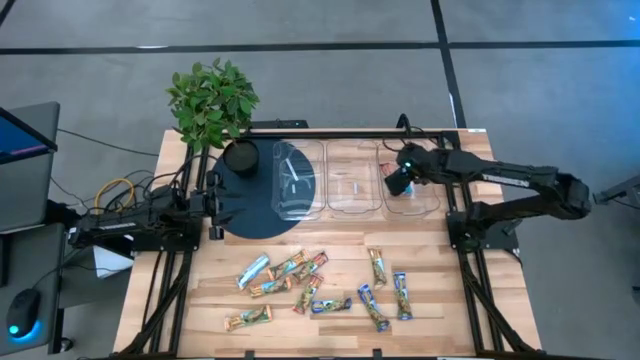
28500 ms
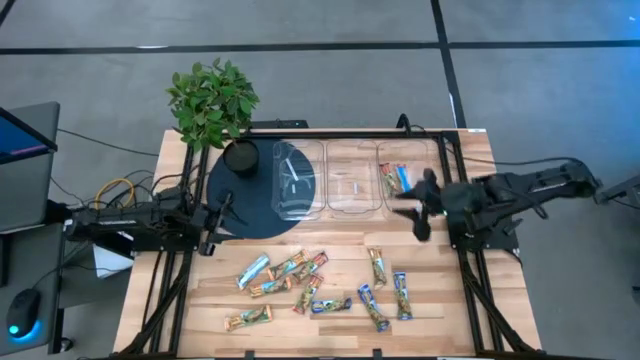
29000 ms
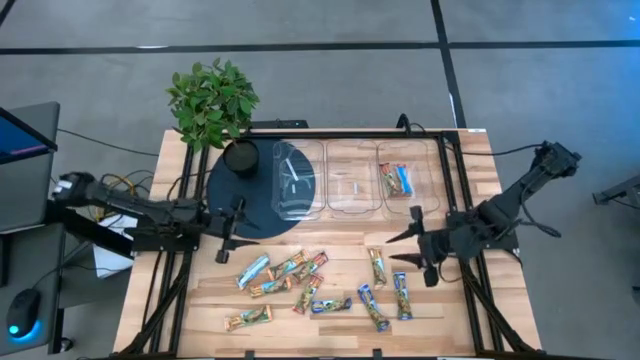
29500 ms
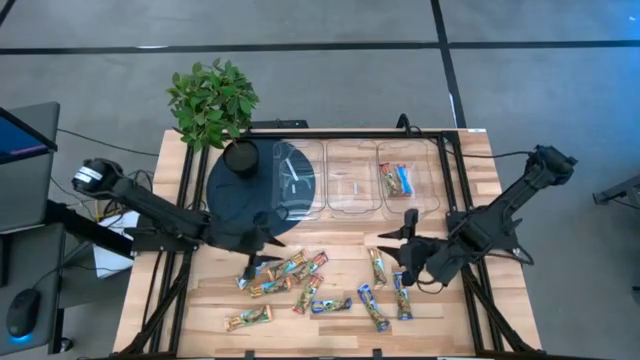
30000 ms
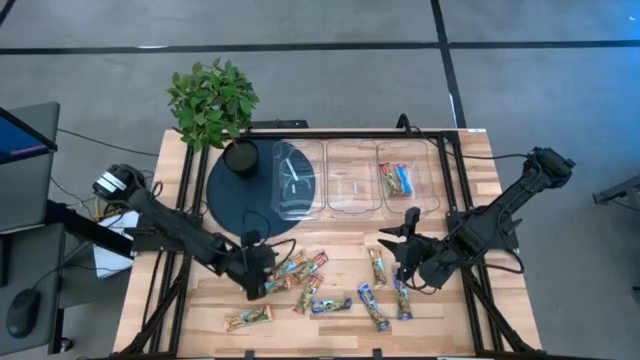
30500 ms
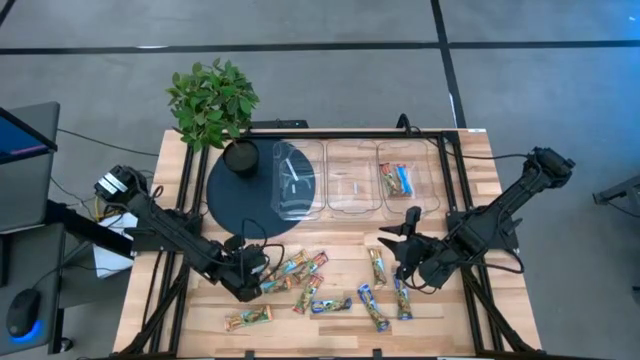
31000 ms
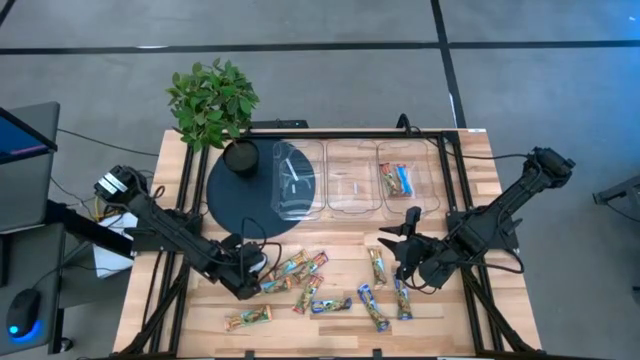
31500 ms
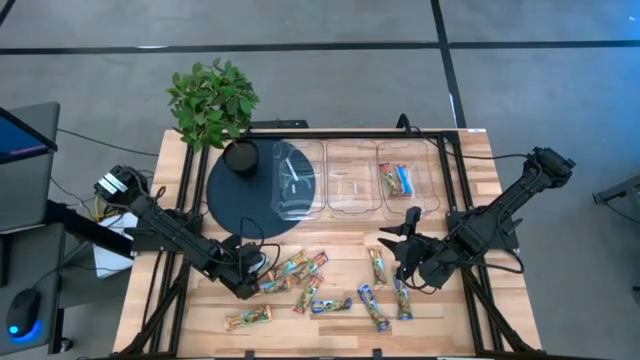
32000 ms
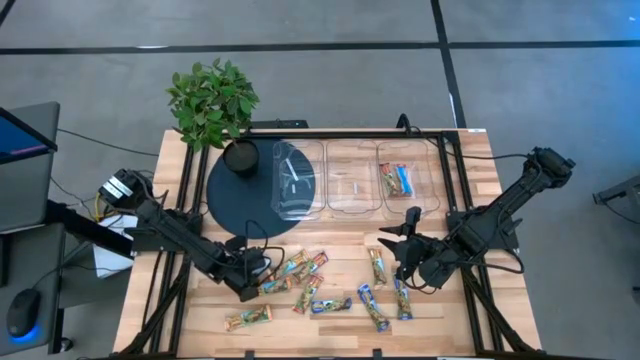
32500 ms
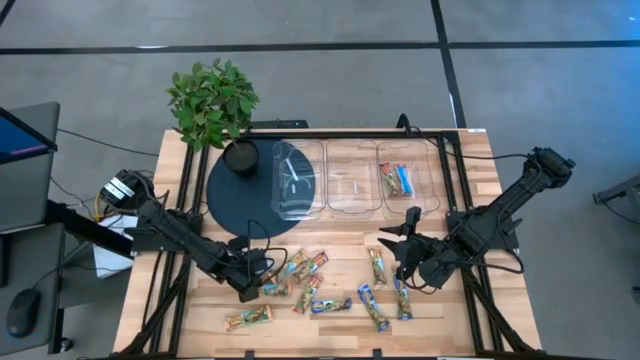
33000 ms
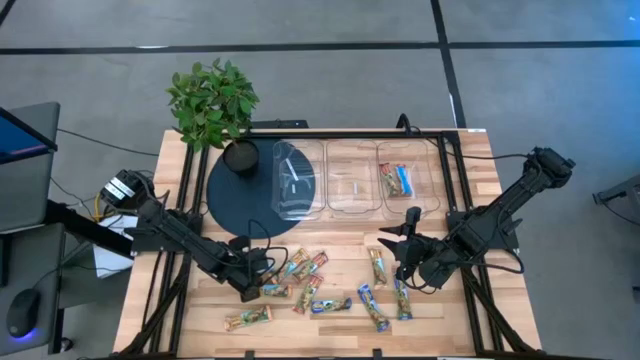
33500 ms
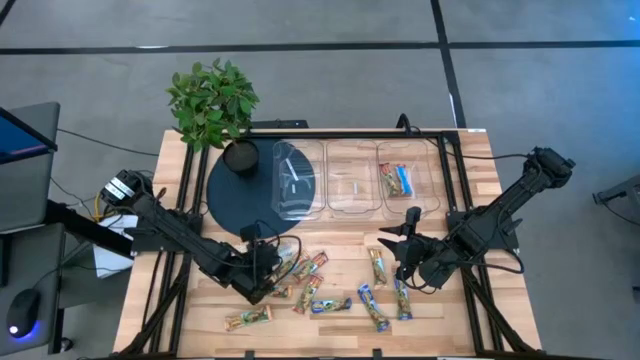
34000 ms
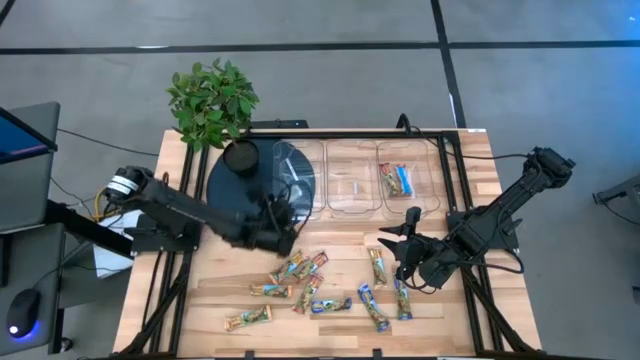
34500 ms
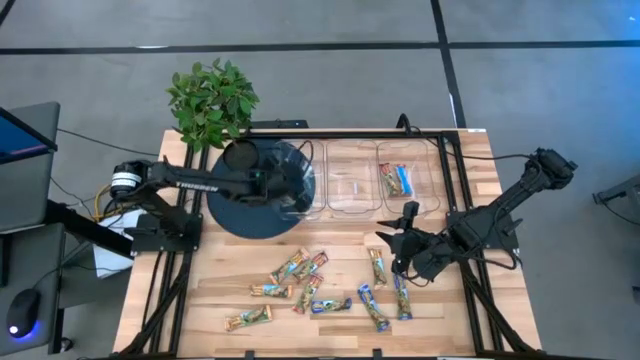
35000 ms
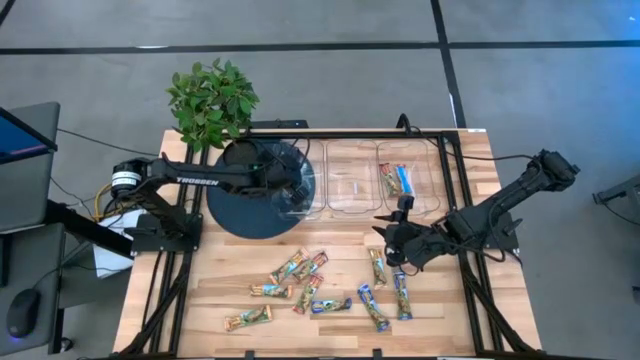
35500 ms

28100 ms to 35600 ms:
Task: Pick and place Granola Bars by type
Put the yellow granola bar into the left transparent bin

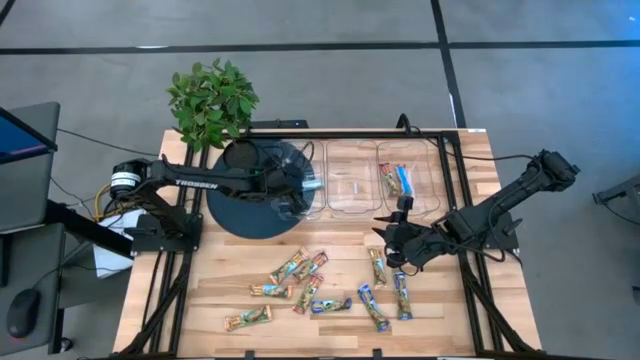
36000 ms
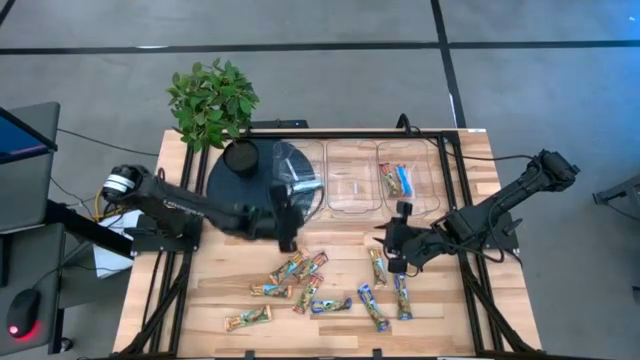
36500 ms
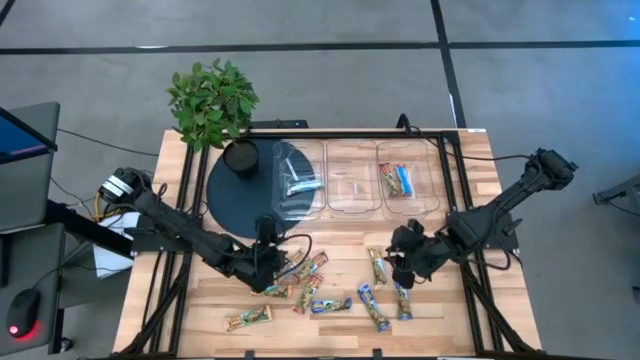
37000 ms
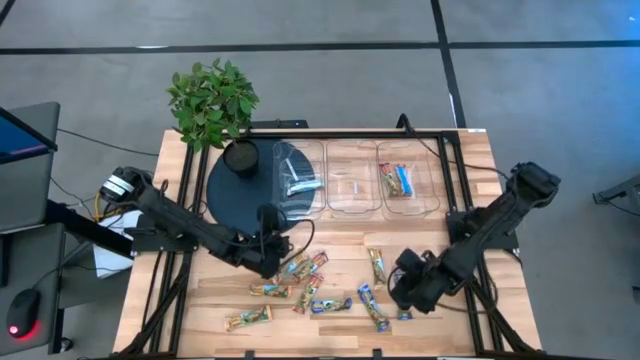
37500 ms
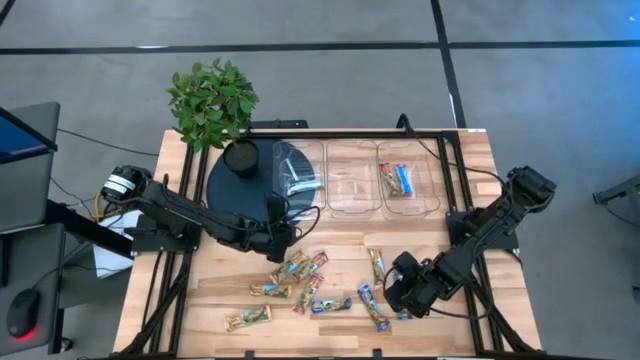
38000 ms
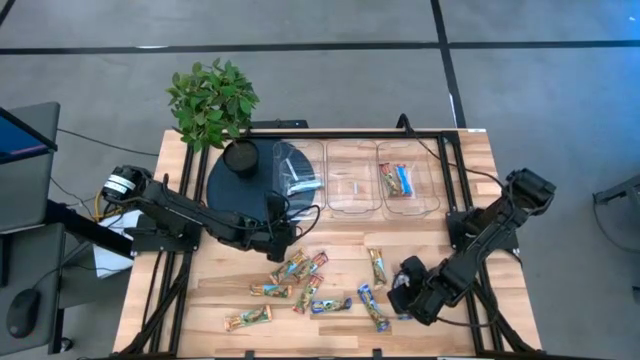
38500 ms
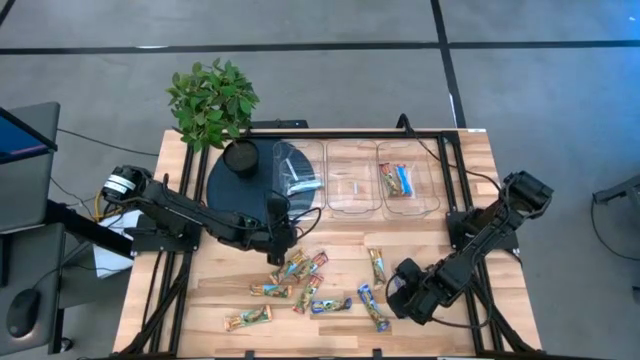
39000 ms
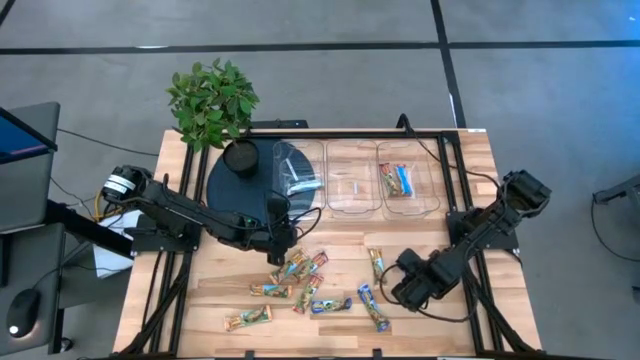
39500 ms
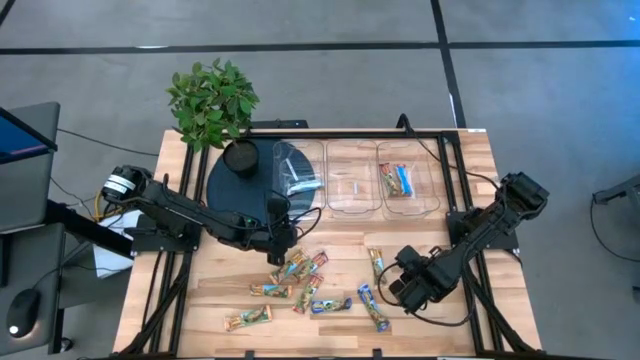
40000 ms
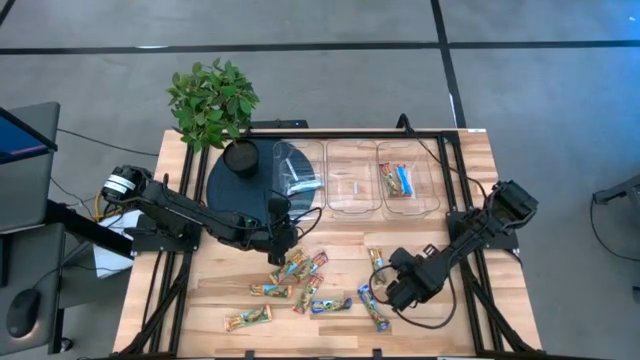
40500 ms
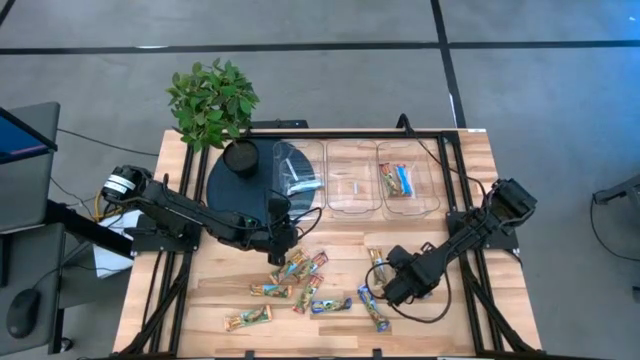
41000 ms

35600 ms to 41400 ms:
Put the blue granola bar into the middle transparent bin

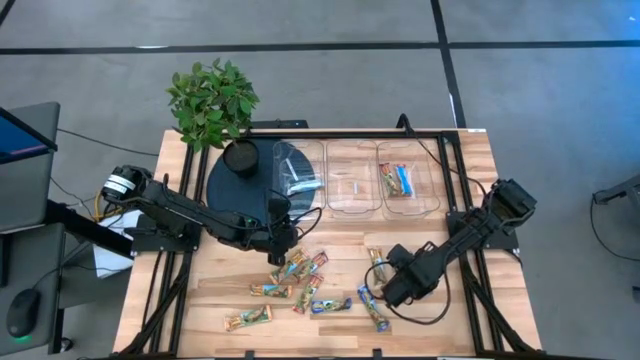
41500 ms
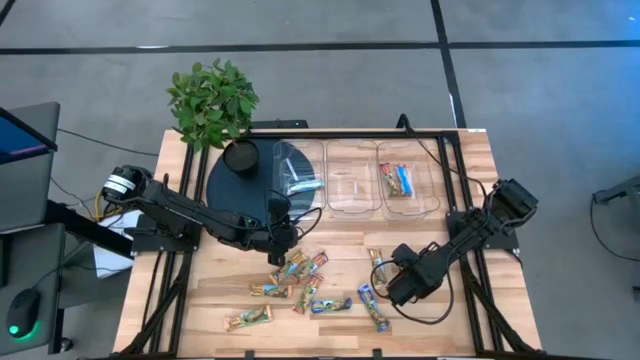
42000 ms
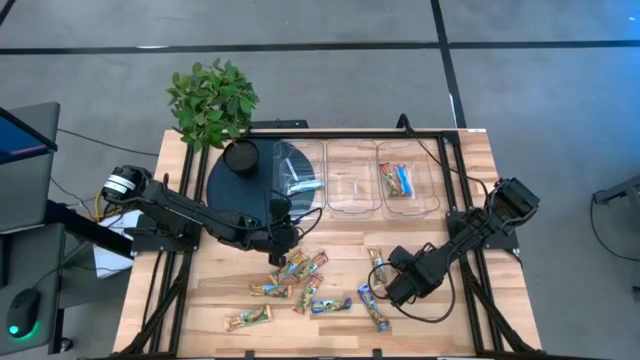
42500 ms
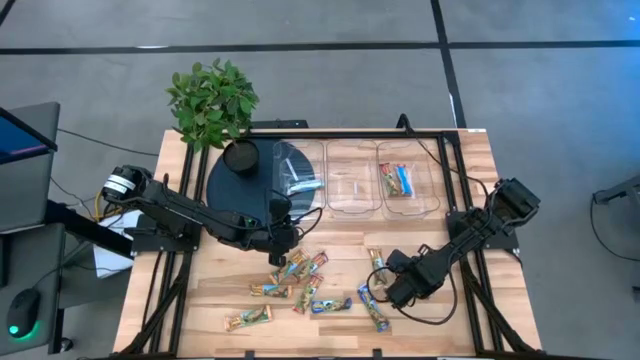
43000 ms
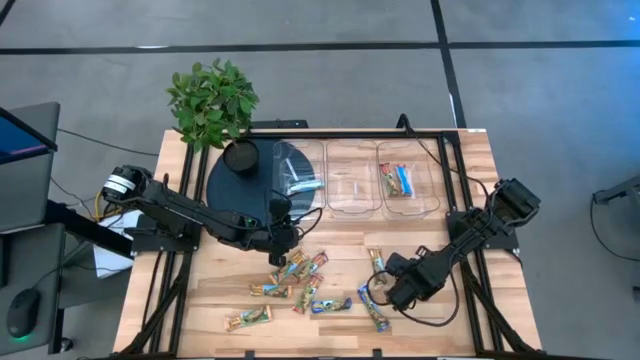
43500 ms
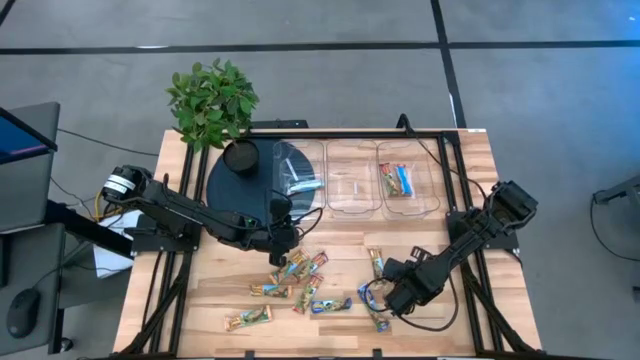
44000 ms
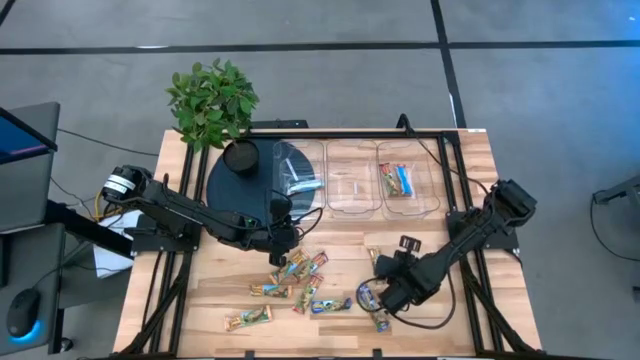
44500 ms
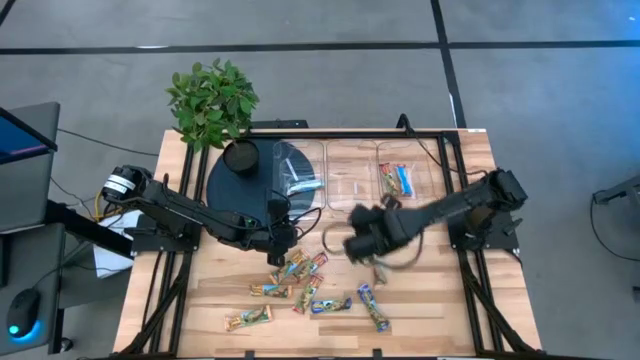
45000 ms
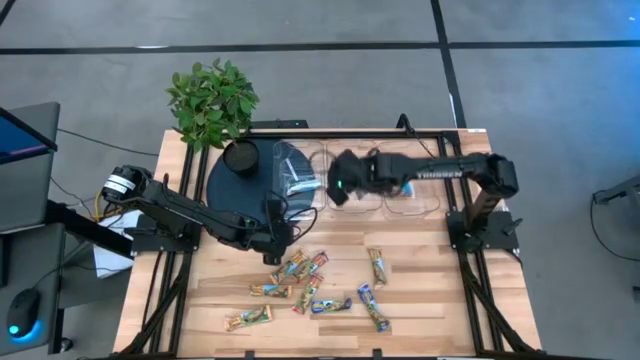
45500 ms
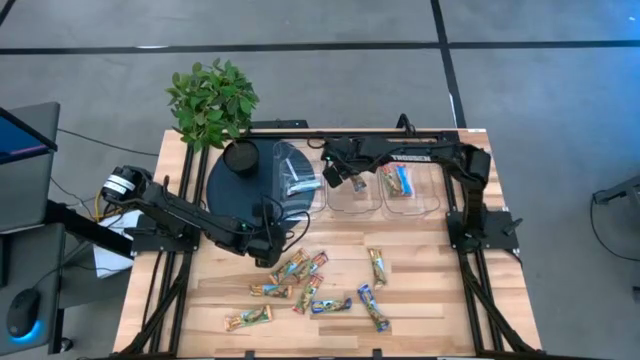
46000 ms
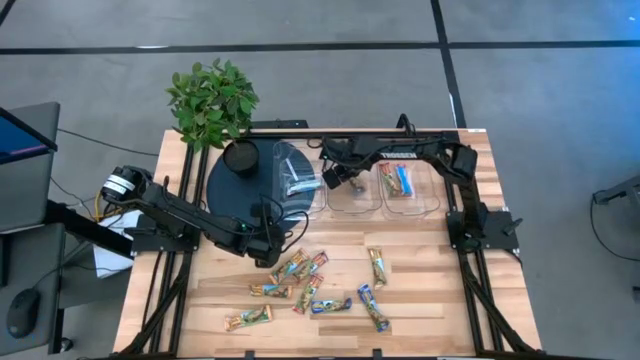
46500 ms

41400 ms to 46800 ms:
Put the blue granola bar into the middle transparent bin

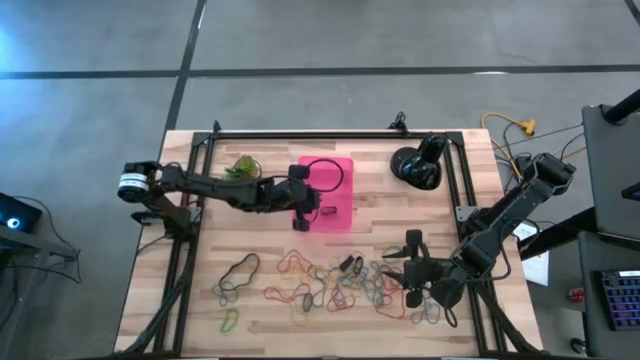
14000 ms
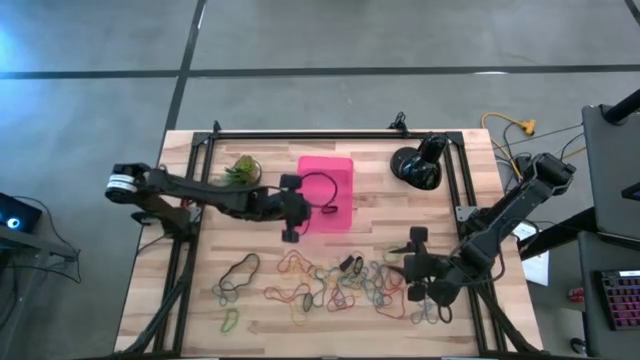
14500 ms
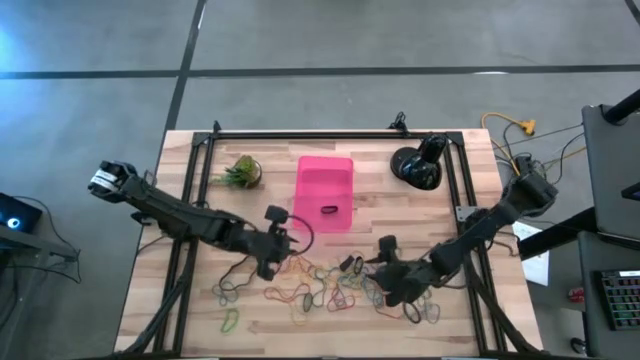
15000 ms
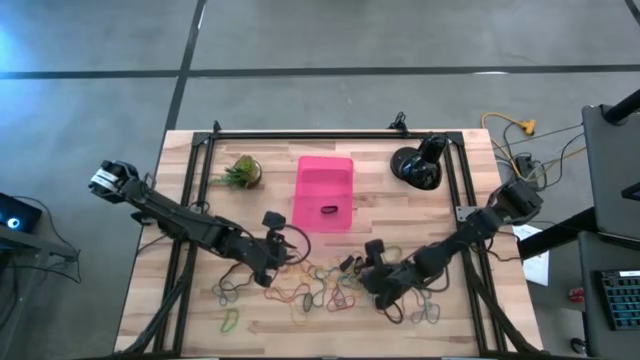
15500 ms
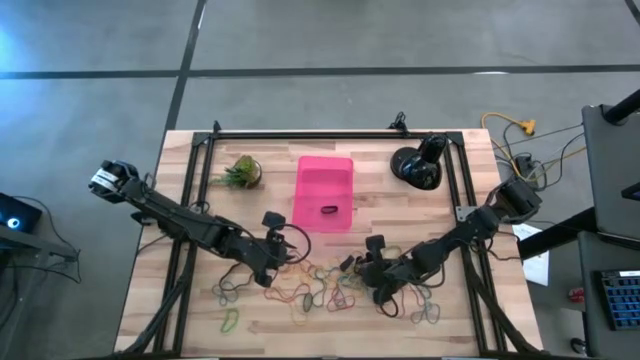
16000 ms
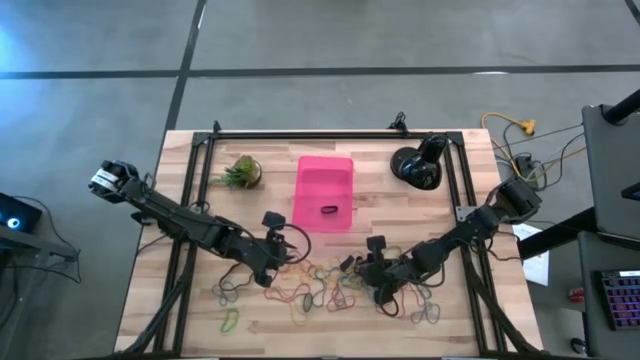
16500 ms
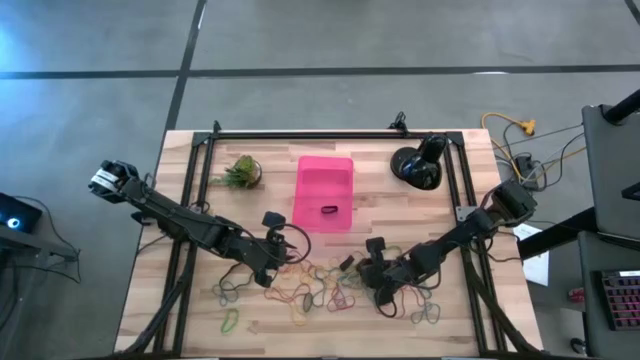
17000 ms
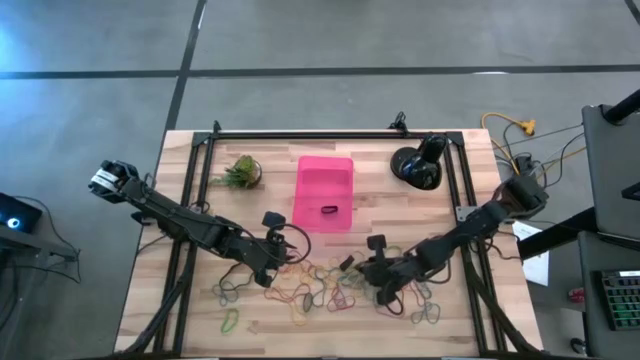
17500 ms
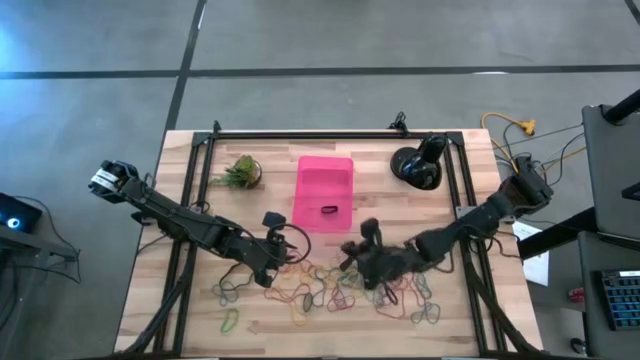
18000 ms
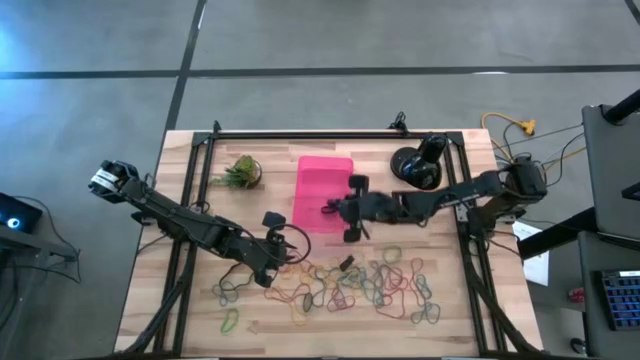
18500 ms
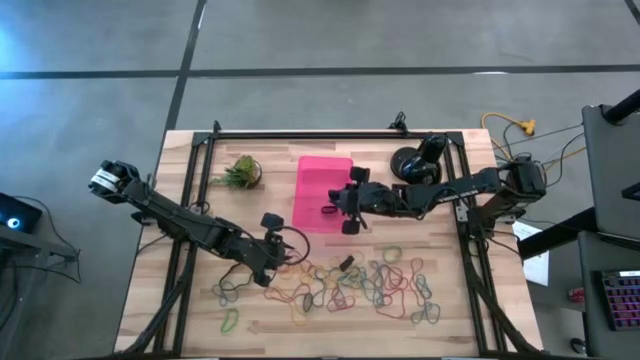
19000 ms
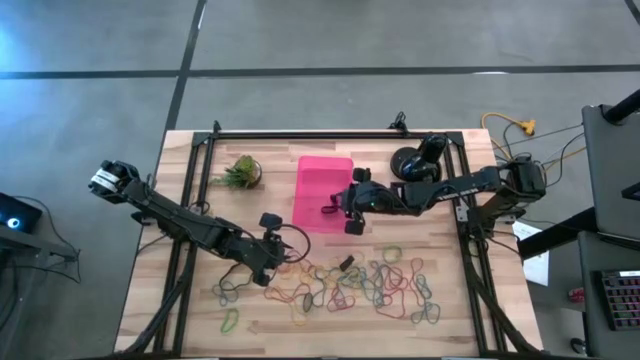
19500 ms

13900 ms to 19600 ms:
Task: Pick and place rubber bands into bin
Put the black rubber bands into the pink bin
